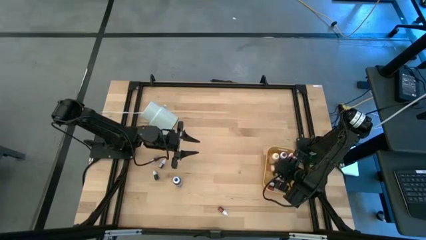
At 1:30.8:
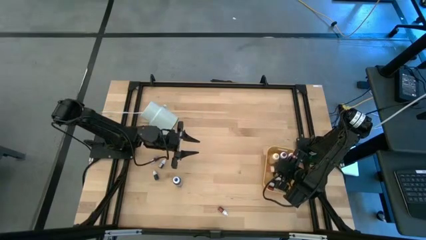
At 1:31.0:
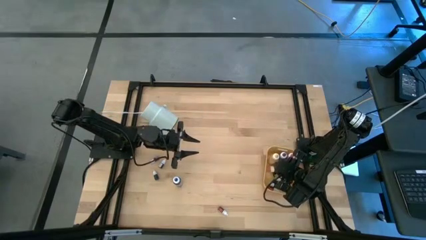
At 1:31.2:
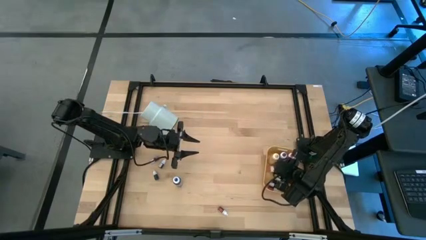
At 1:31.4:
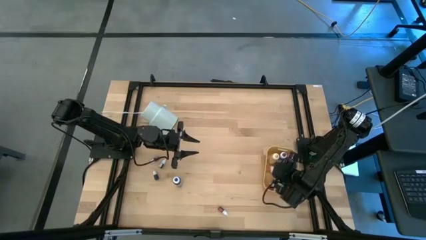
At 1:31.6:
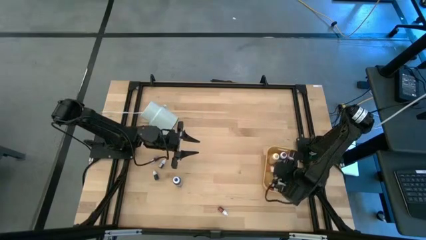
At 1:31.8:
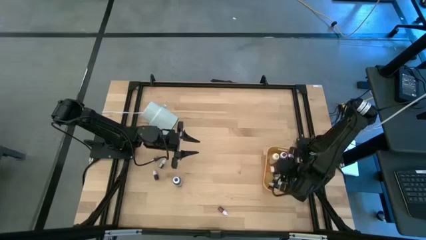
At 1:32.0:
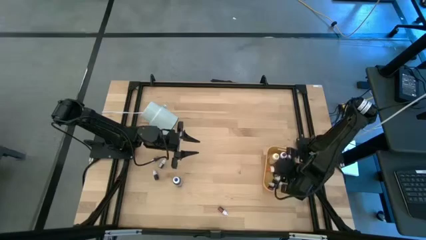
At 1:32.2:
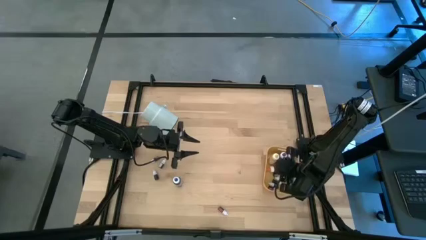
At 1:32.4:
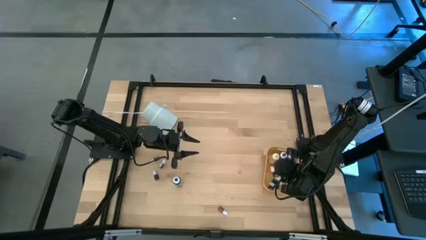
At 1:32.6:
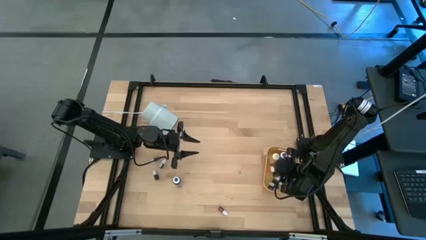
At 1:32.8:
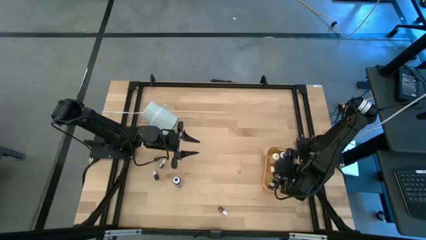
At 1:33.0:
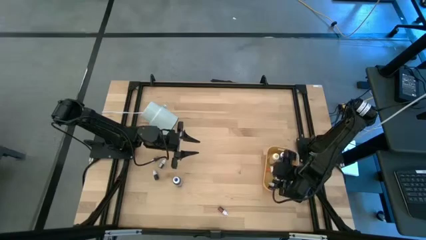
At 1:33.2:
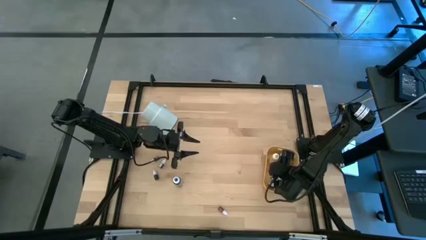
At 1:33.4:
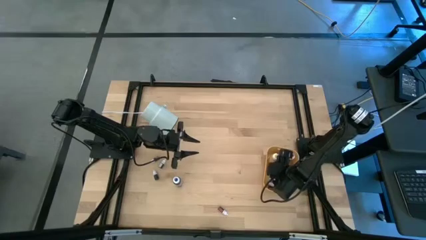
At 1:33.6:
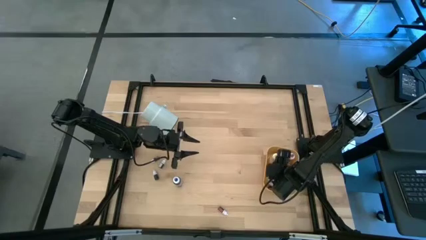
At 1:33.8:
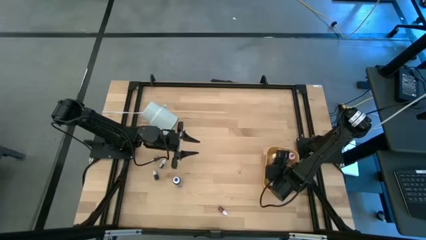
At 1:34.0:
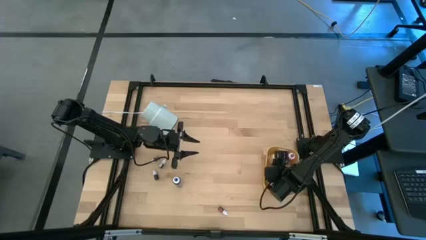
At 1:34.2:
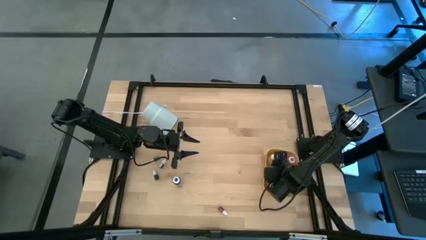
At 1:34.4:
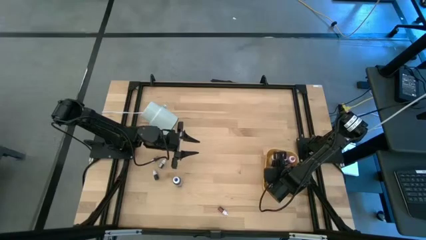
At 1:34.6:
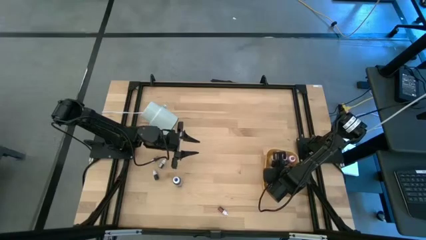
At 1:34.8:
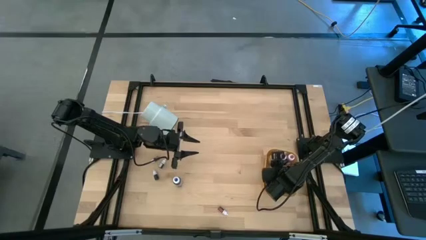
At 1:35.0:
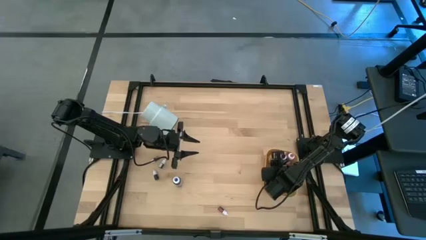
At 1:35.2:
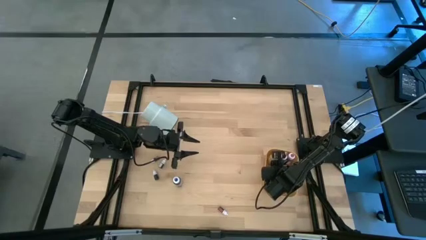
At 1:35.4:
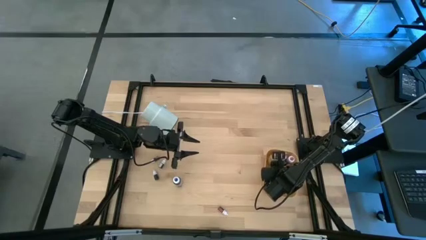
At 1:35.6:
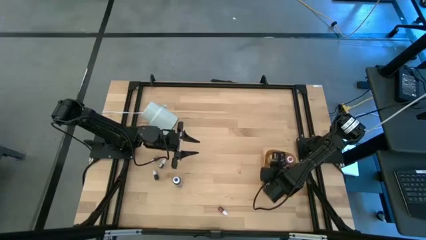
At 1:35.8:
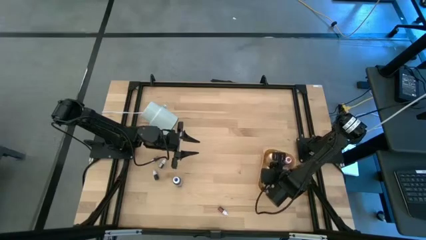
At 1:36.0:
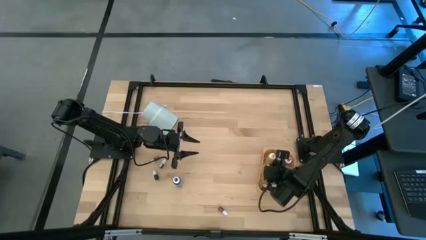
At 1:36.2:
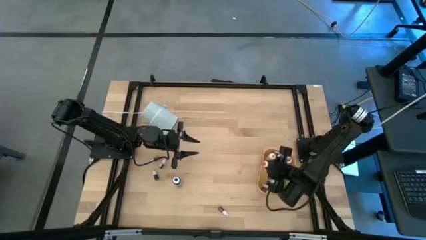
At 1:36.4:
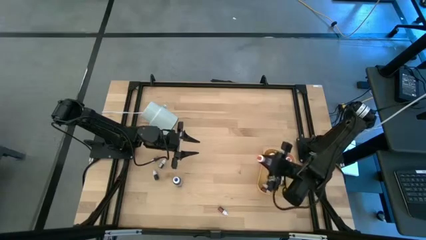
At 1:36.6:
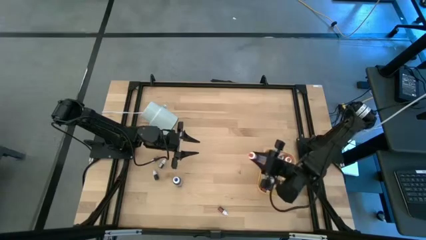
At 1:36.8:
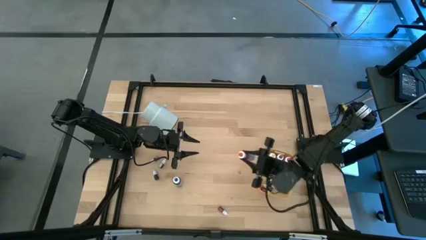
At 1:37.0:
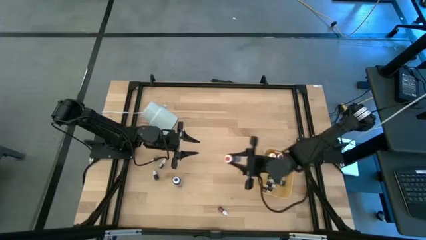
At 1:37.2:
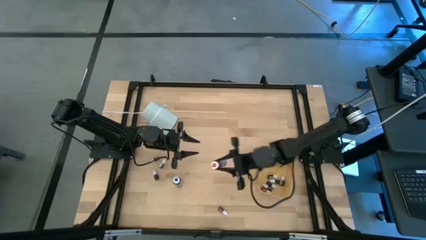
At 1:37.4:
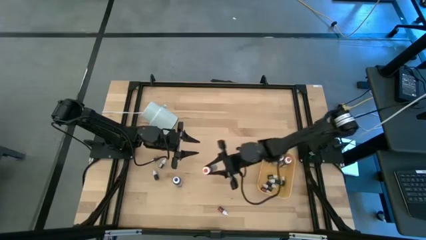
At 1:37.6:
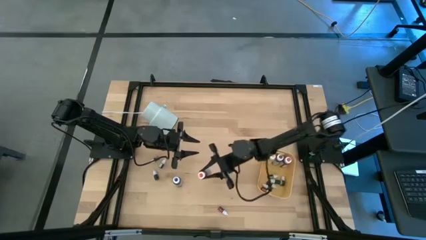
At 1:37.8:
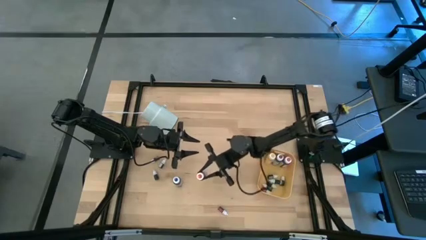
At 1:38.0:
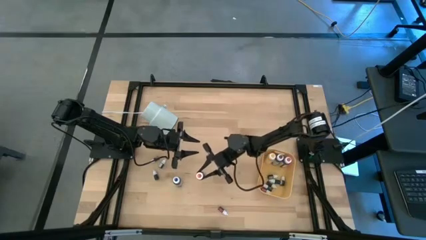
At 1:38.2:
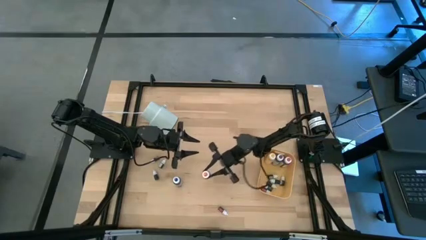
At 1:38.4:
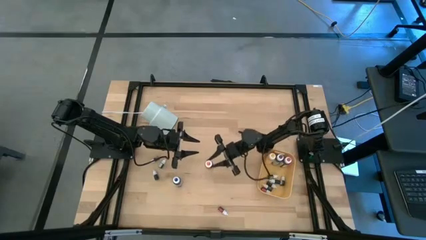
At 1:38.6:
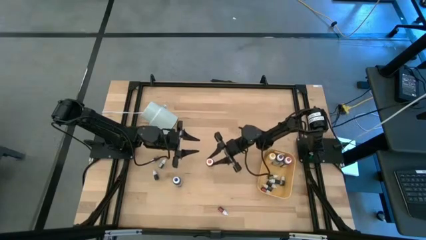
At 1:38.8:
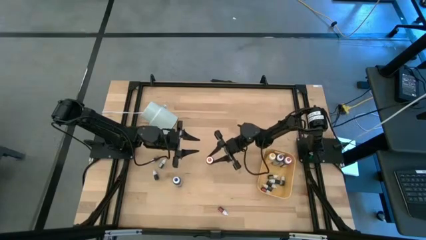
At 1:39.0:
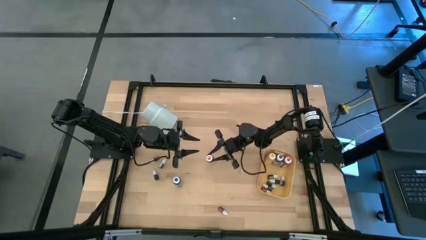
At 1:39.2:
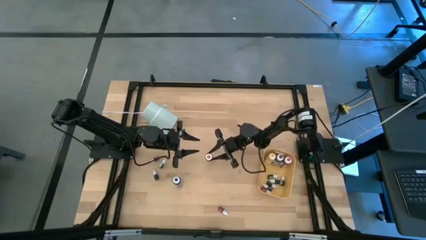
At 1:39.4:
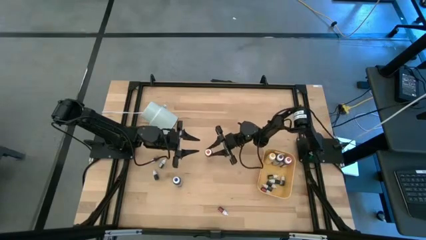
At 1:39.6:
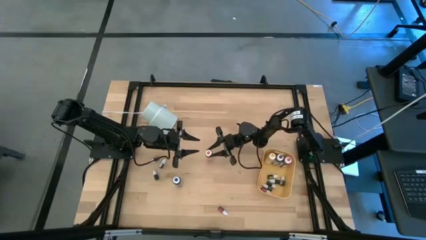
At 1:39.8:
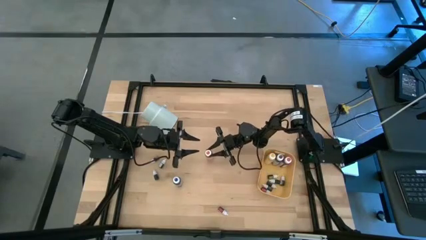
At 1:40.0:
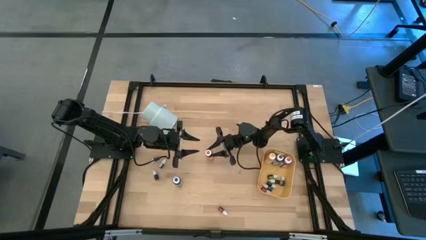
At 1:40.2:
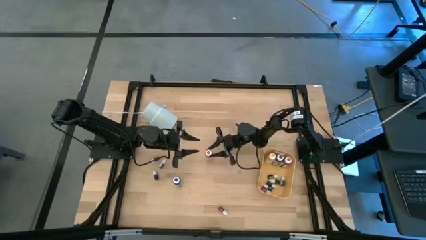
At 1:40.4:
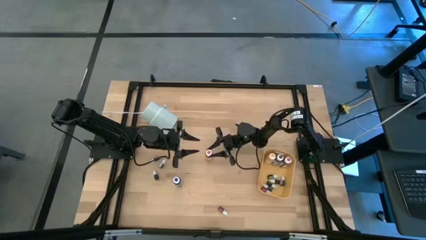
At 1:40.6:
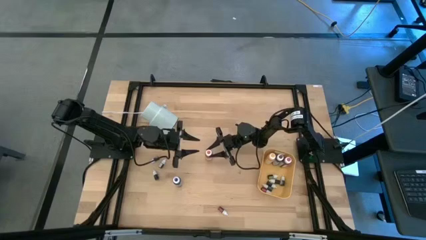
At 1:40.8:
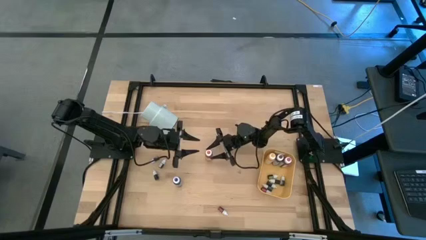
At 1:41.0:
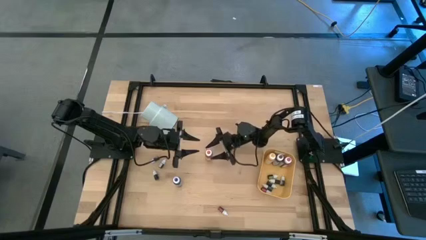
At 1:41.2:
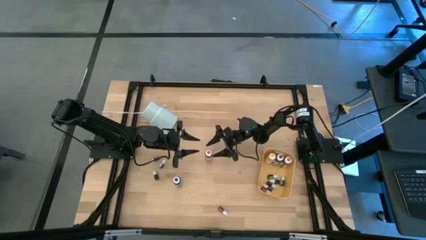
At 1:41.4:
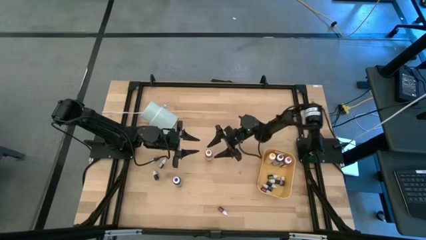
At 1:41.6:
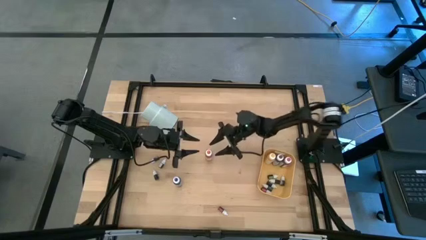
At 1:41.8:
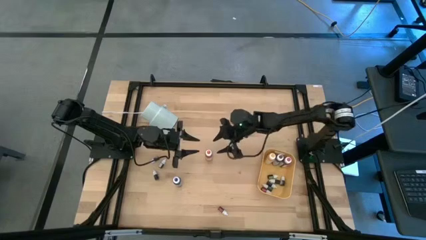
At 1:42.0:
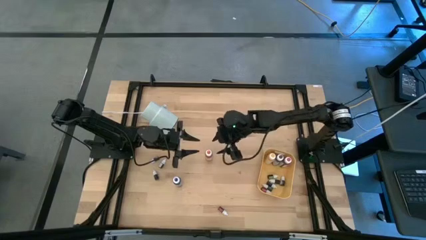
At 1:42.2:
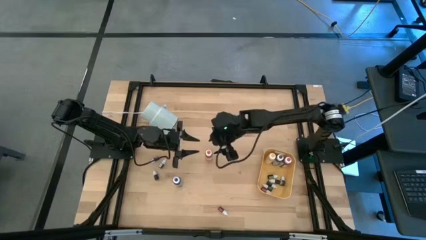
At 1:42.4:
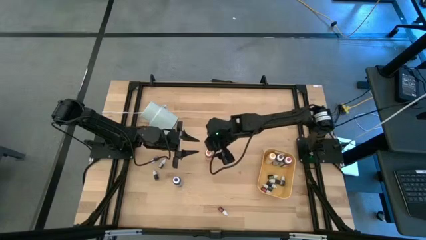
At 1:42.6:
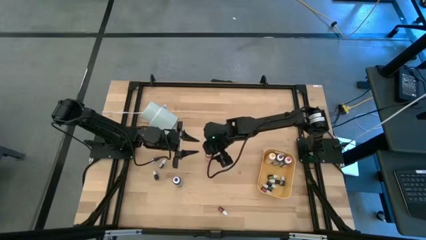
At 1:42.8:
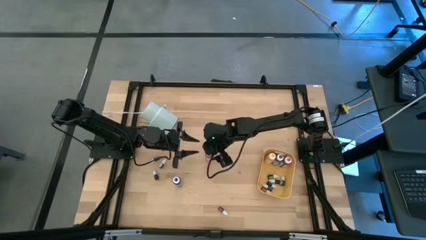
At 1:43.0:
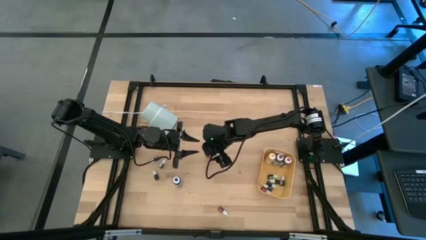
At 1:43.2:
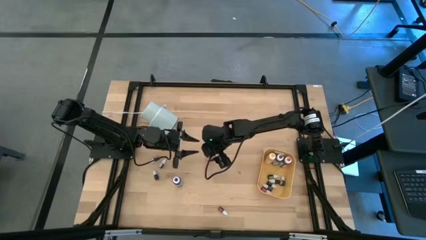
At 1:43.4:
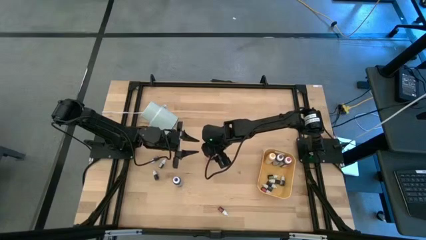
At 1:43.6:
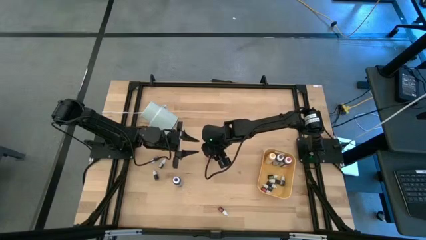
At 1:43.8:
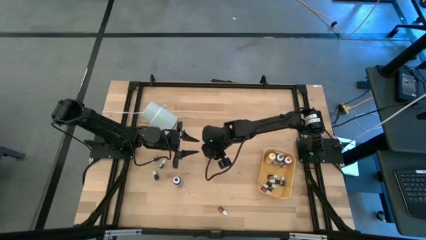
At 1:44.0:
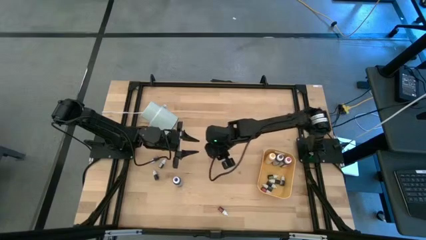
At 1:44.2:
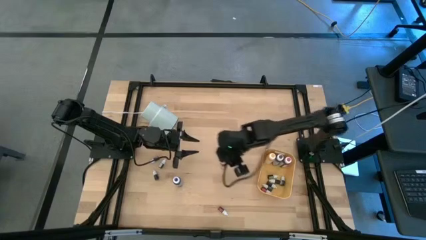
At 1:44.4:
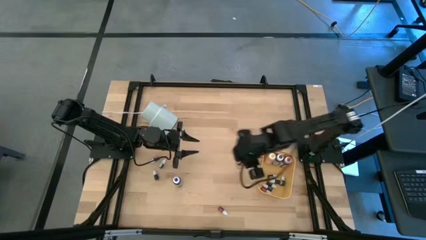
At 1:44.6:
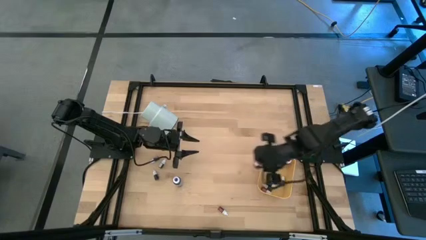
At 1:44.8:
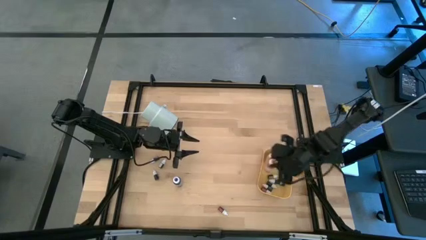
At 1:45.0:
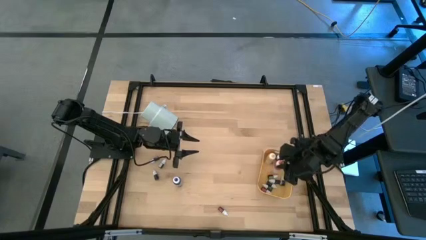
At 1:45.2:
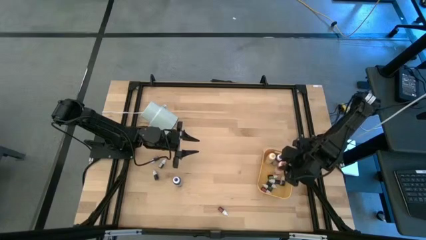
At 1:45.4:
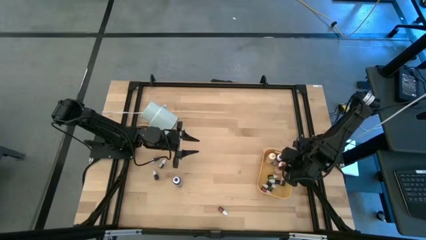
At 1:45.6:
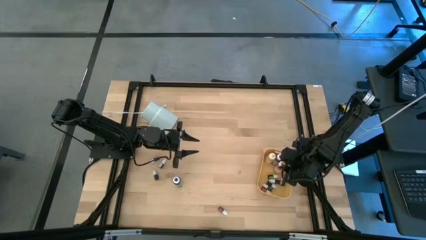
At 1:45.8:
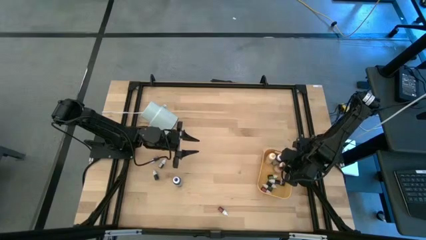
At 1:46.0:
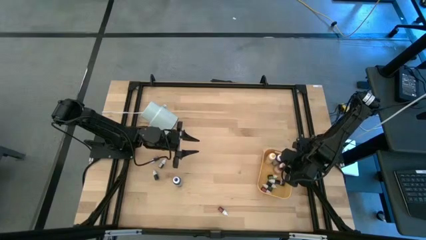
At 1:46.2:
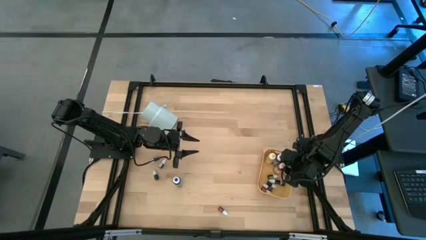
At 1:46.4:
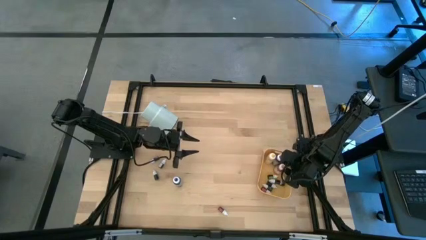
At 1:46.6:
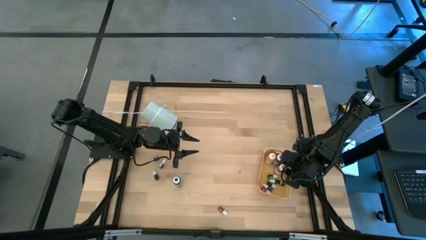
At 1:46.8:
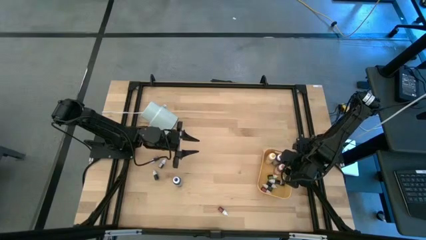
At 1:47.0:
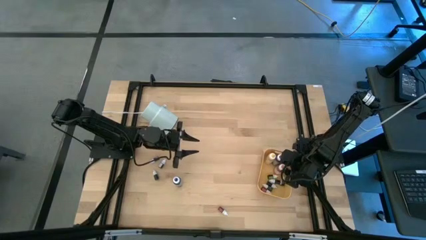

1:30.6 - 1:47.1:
Task: Pick & Place food coloring
Put the large orange food coloring bottle into the yellow bin
